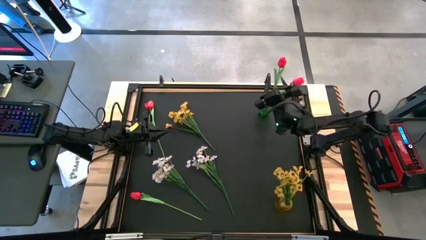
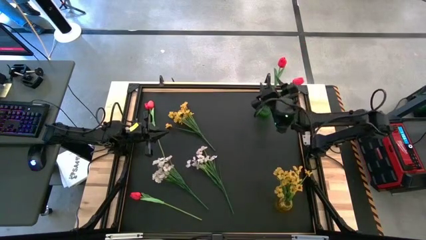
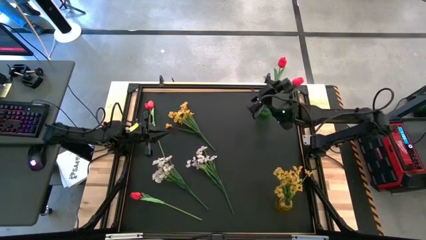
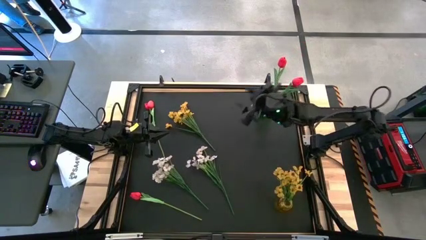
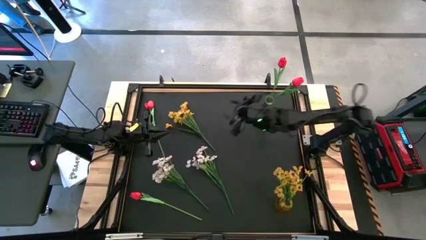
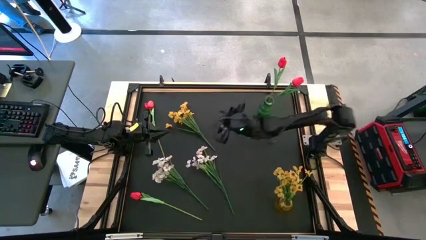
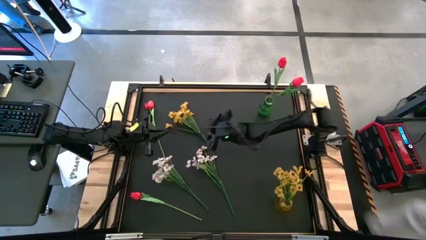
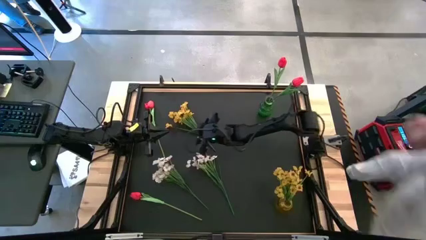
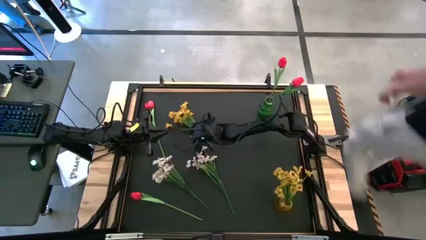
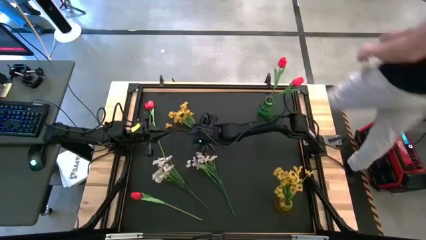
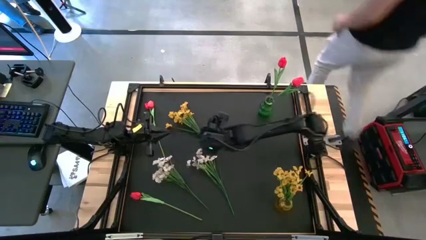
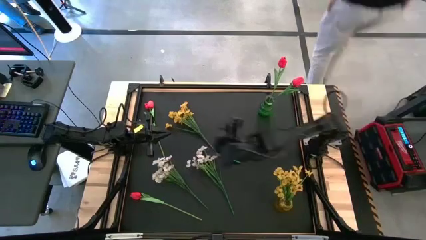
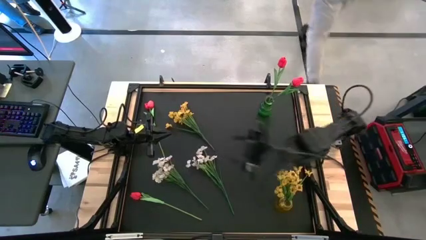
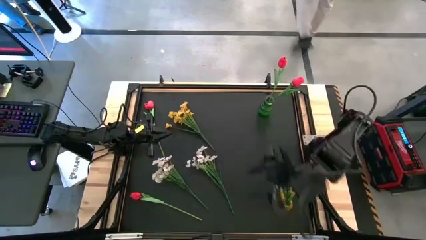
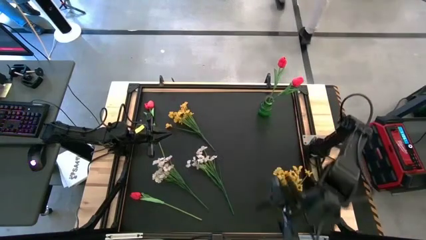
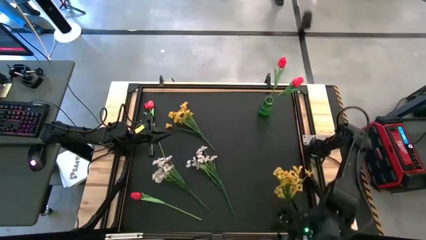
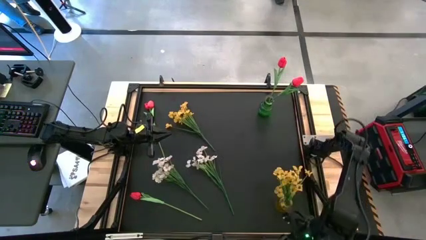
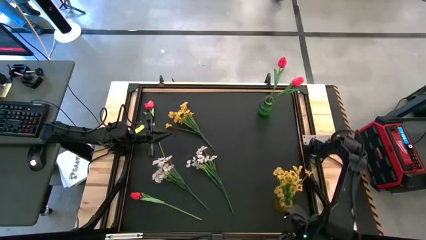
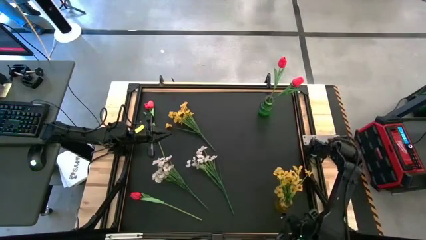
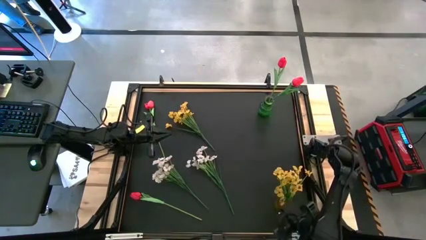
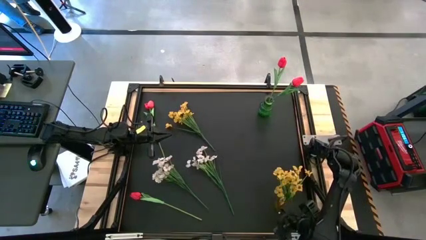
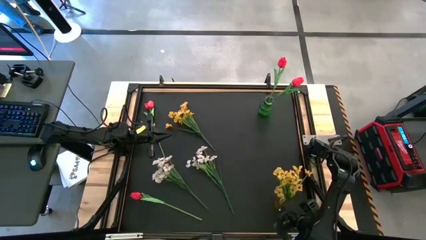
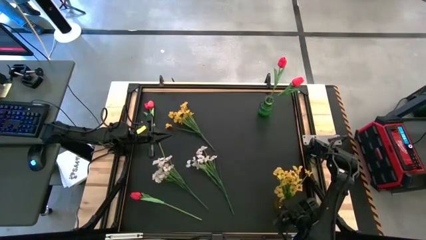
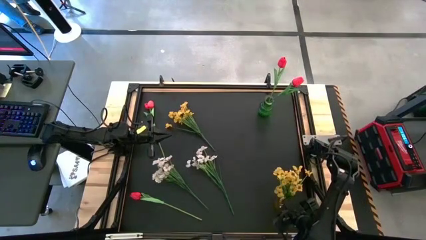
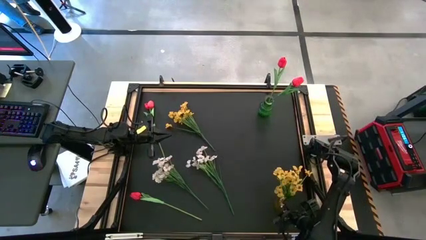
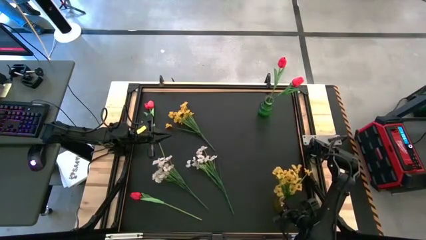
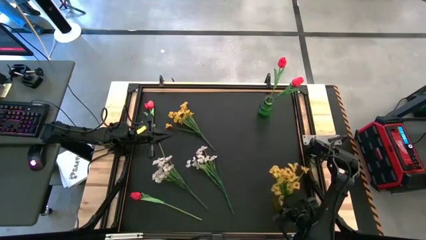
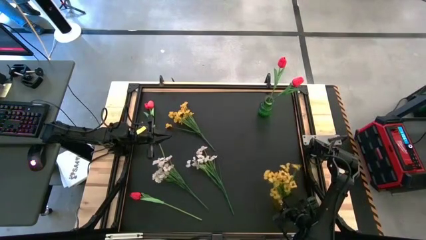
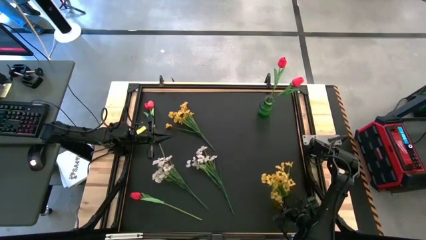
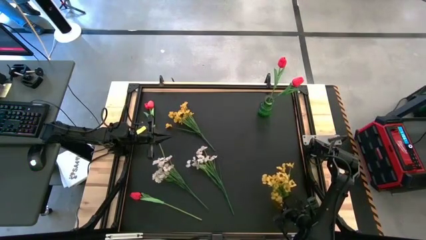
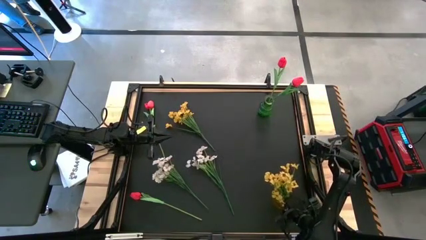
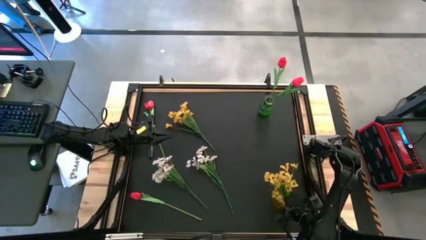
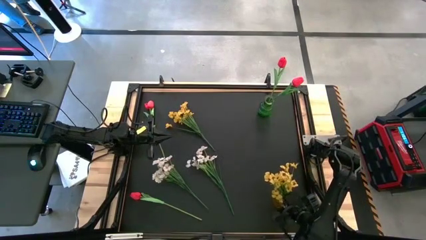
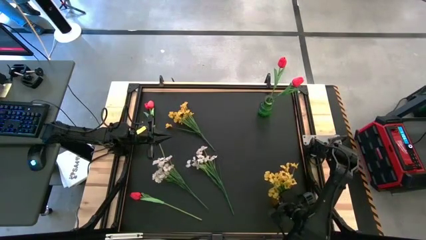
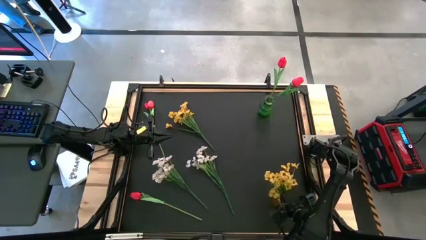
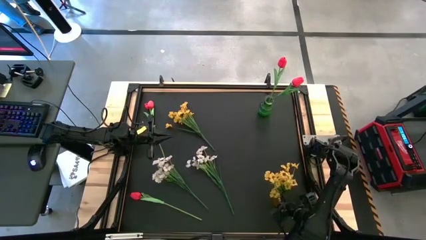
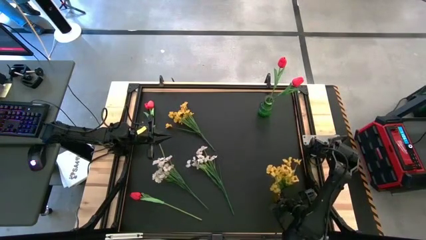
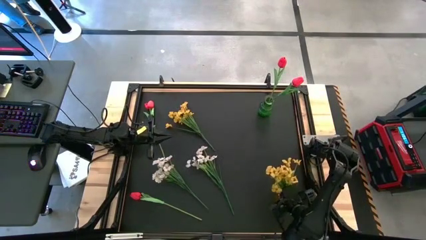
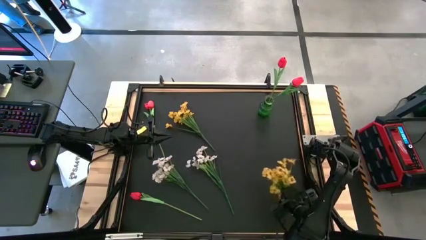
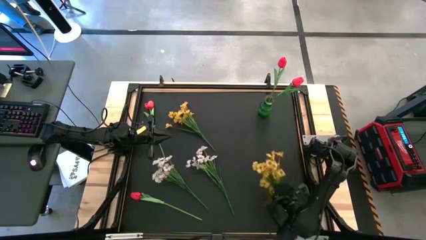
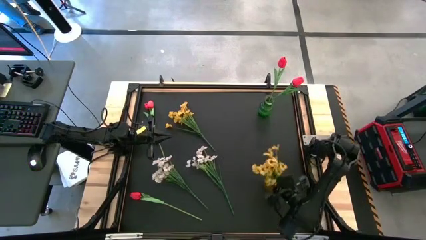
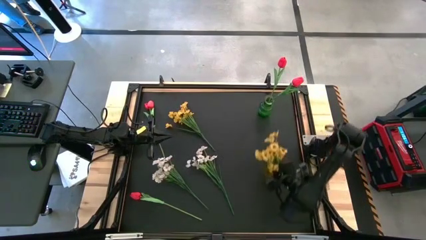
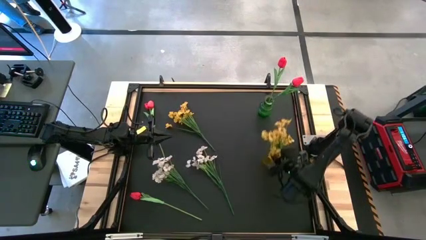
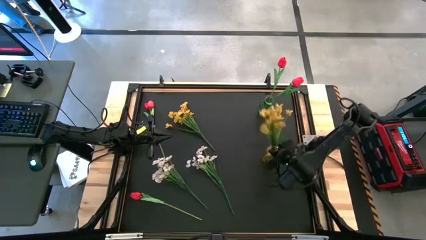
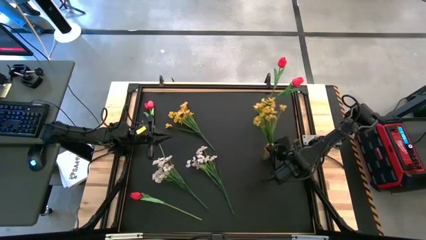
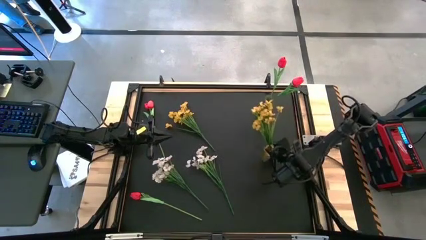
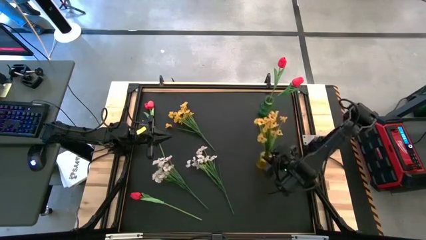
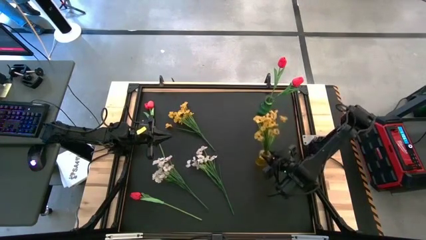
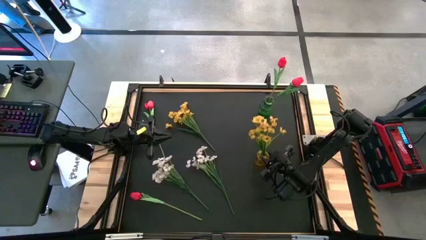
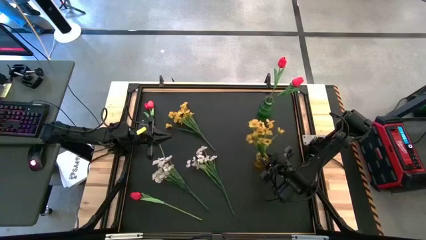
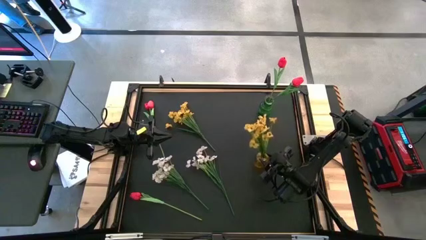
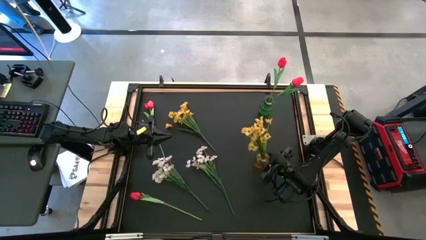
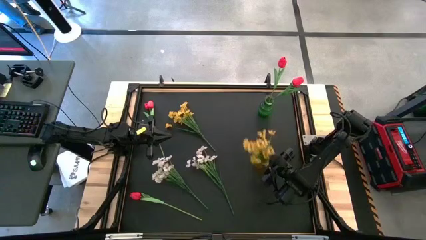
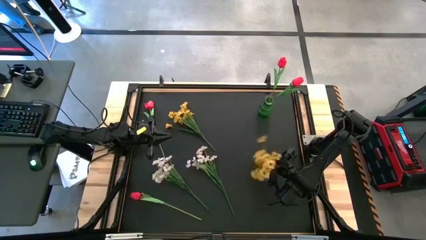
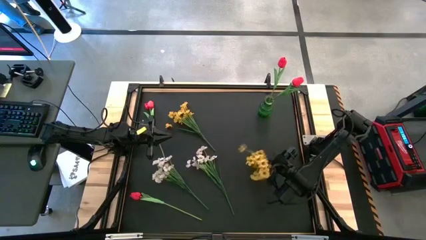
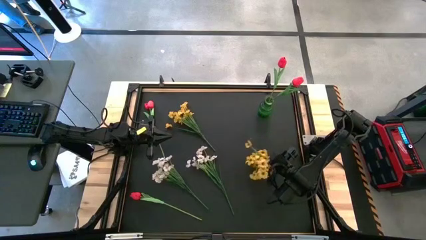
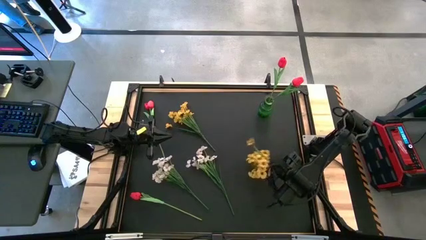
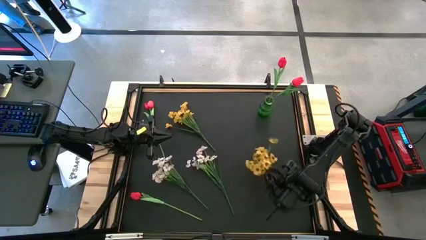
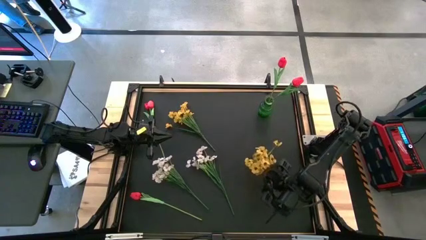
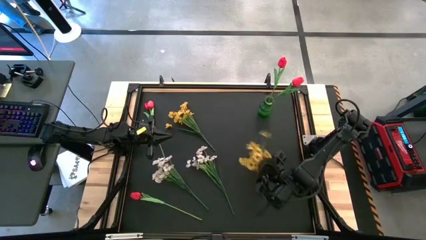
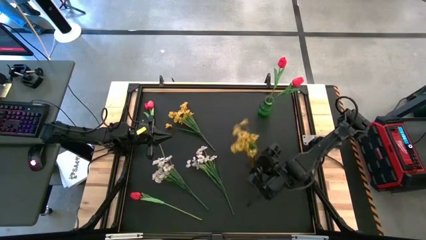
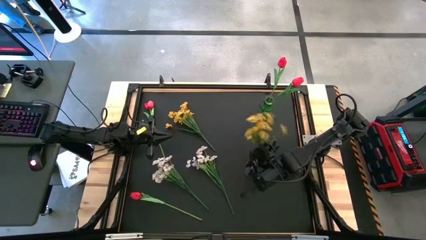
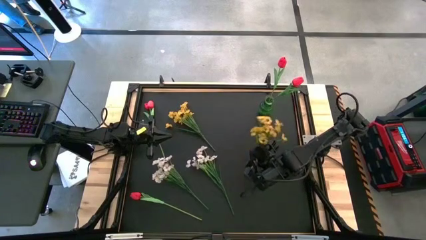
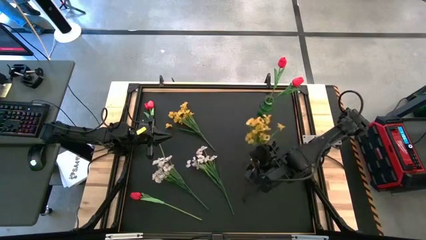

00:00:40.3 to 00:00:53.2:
Task: Sort flowers into vase by color
Move the yellow vase to the middle right of the table
